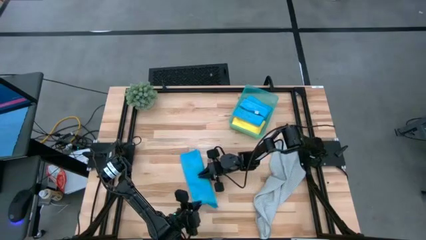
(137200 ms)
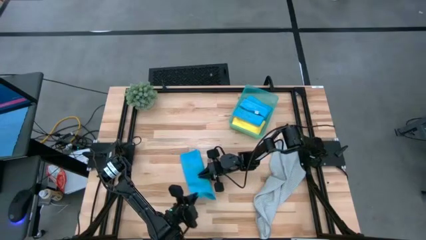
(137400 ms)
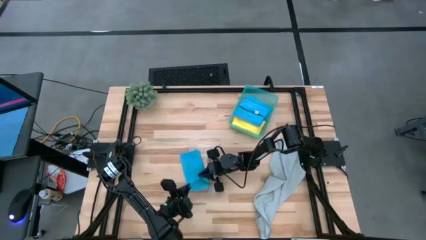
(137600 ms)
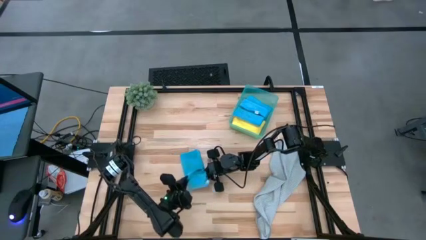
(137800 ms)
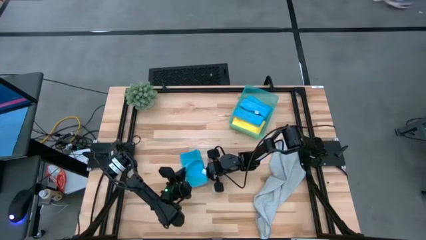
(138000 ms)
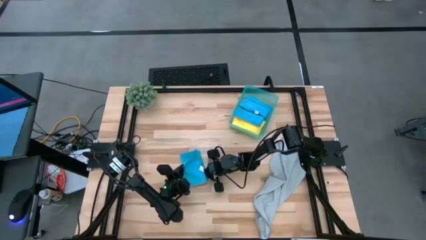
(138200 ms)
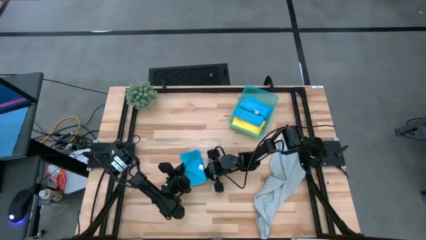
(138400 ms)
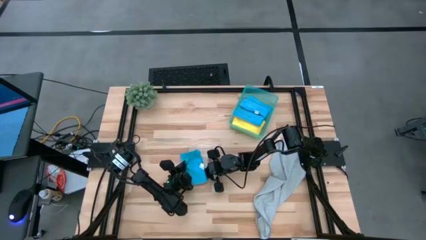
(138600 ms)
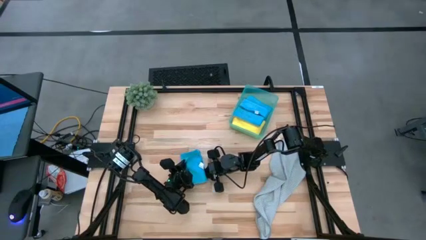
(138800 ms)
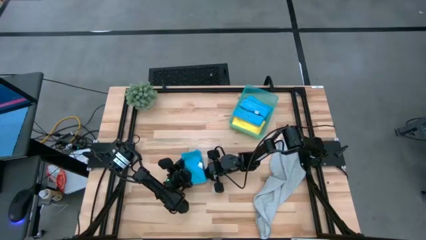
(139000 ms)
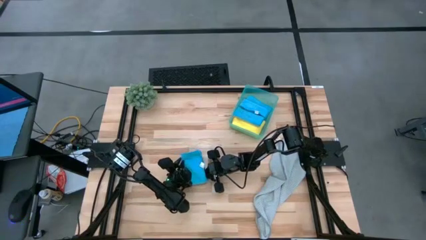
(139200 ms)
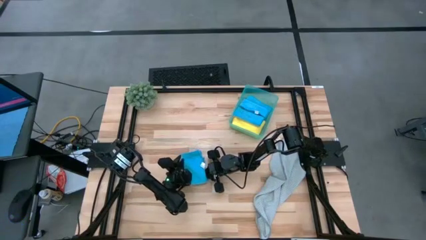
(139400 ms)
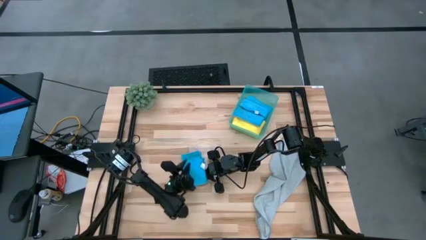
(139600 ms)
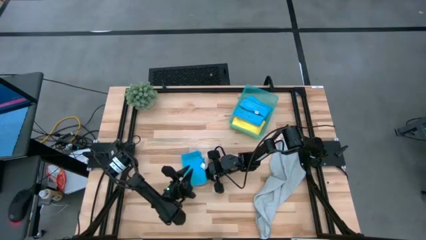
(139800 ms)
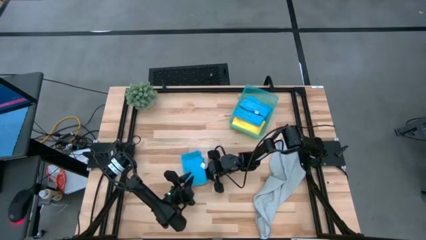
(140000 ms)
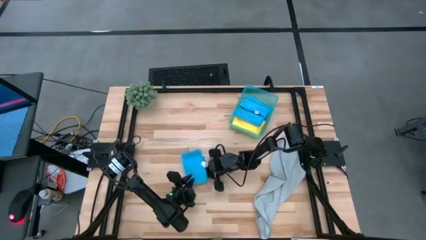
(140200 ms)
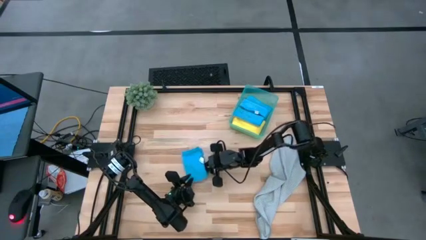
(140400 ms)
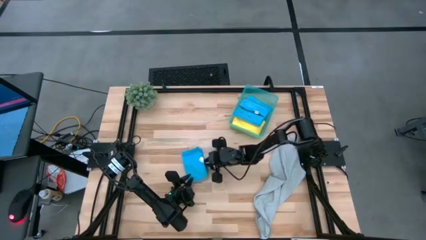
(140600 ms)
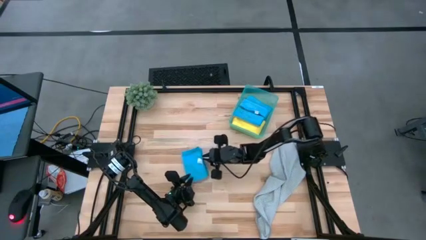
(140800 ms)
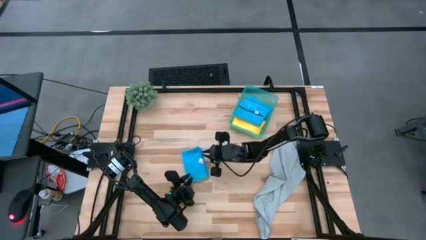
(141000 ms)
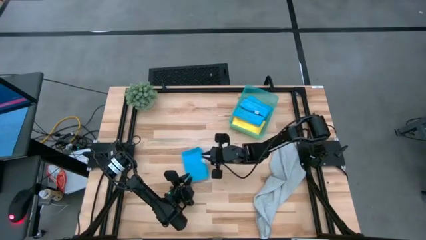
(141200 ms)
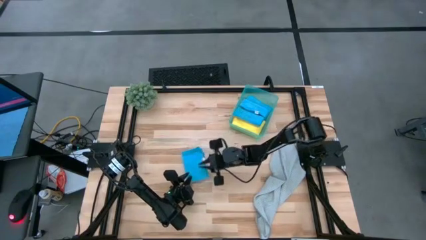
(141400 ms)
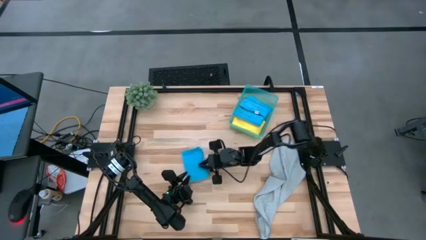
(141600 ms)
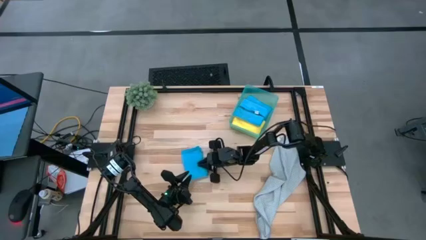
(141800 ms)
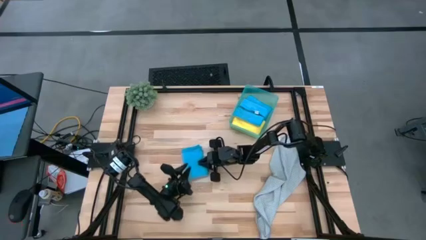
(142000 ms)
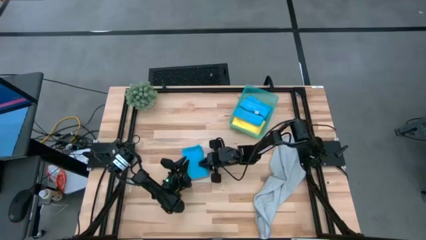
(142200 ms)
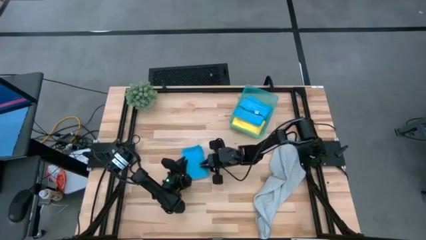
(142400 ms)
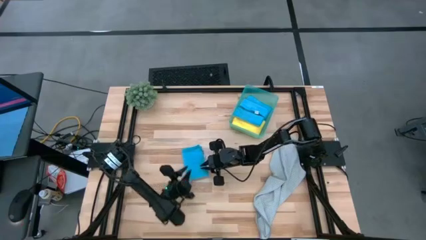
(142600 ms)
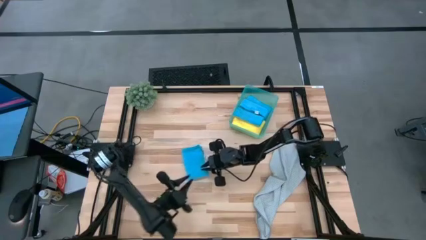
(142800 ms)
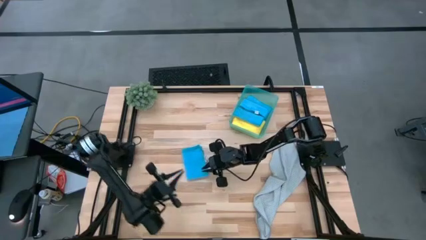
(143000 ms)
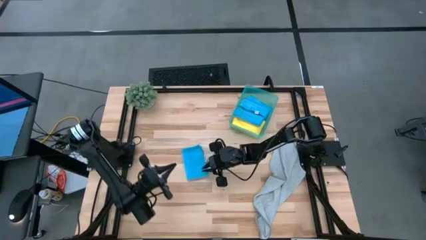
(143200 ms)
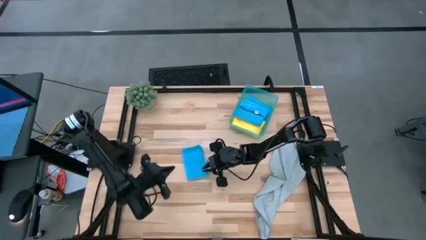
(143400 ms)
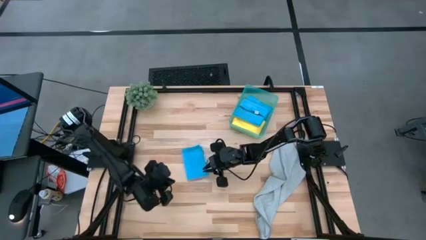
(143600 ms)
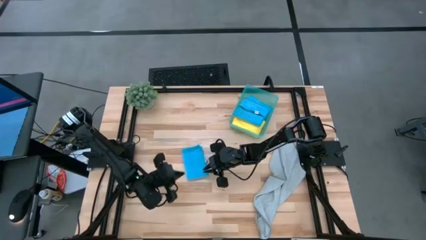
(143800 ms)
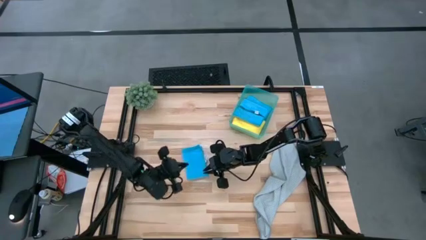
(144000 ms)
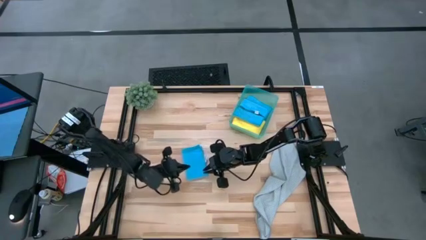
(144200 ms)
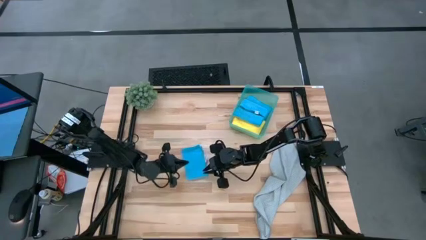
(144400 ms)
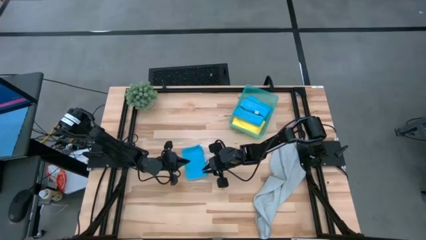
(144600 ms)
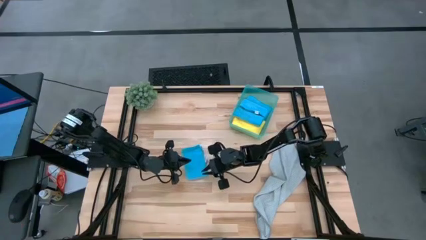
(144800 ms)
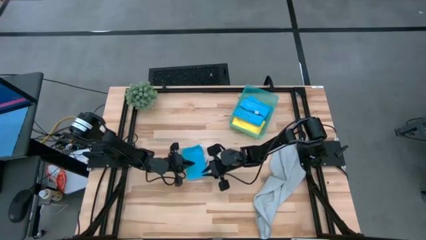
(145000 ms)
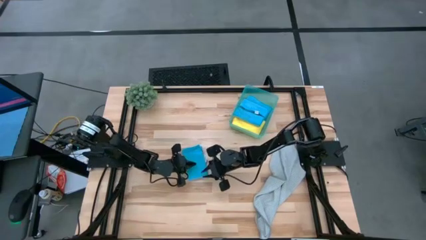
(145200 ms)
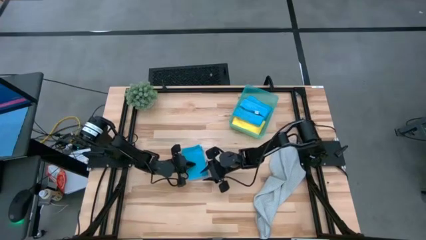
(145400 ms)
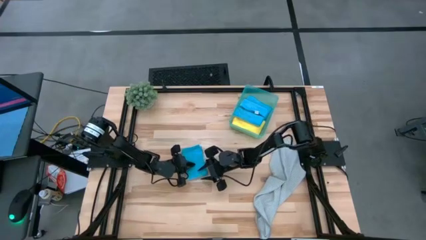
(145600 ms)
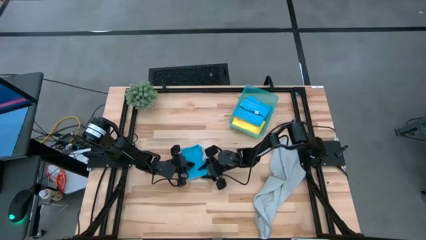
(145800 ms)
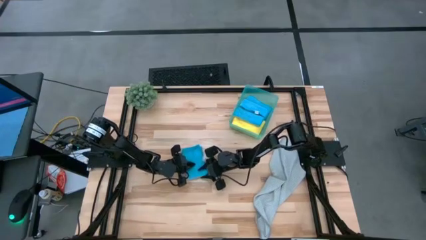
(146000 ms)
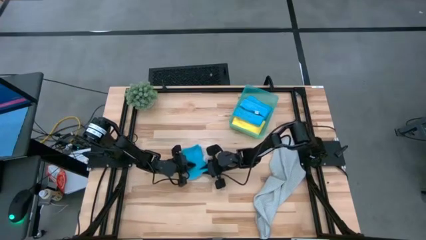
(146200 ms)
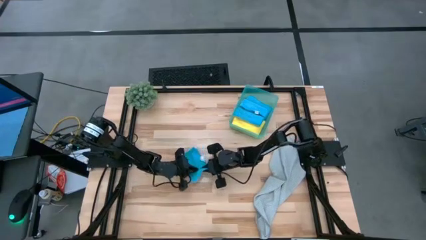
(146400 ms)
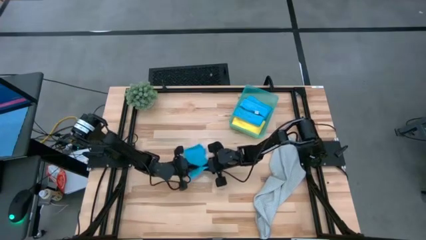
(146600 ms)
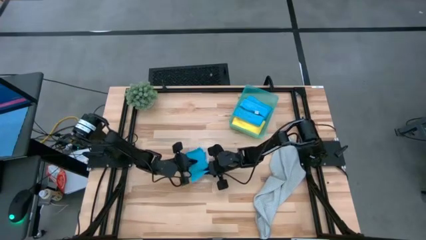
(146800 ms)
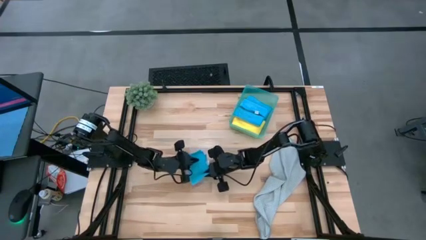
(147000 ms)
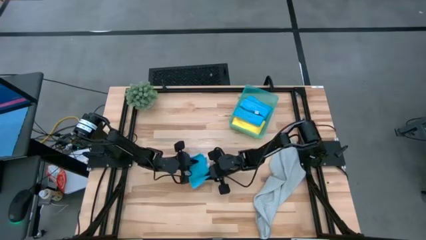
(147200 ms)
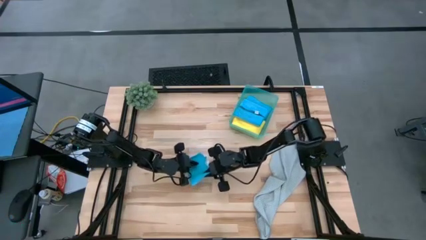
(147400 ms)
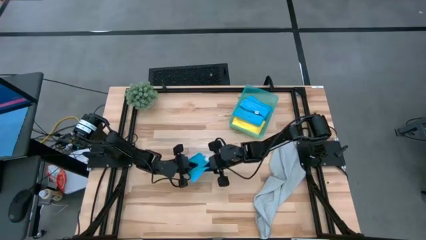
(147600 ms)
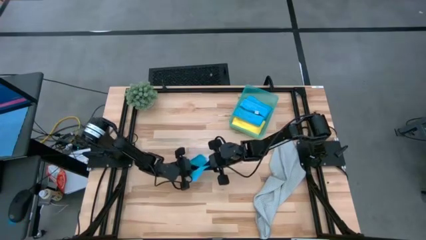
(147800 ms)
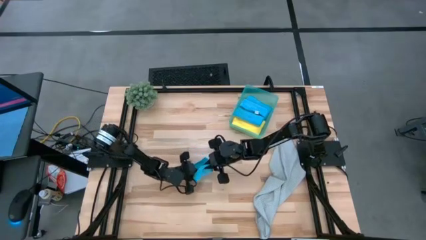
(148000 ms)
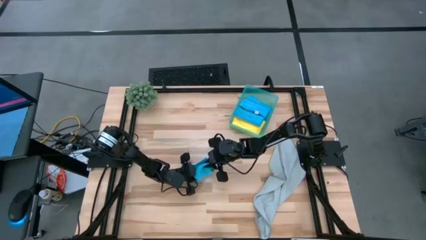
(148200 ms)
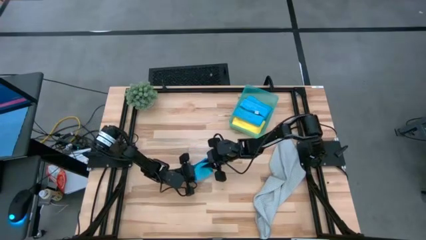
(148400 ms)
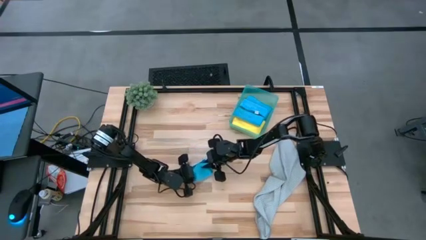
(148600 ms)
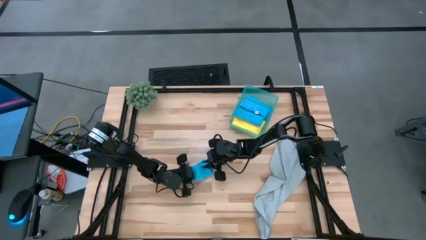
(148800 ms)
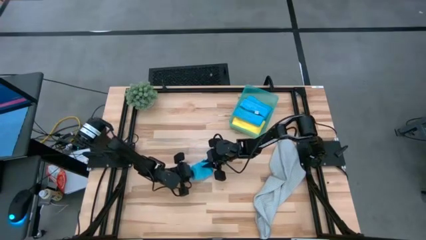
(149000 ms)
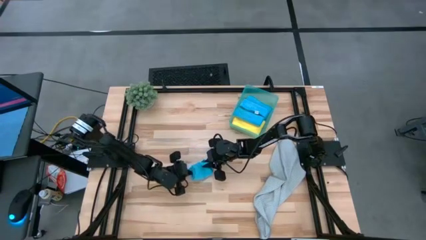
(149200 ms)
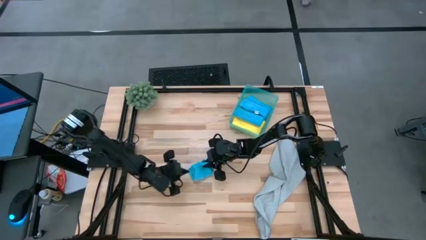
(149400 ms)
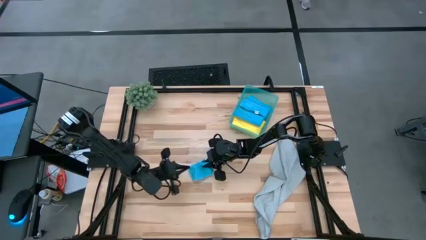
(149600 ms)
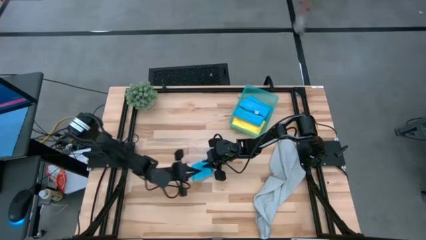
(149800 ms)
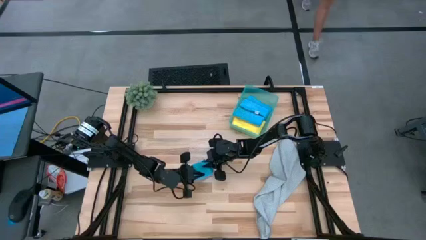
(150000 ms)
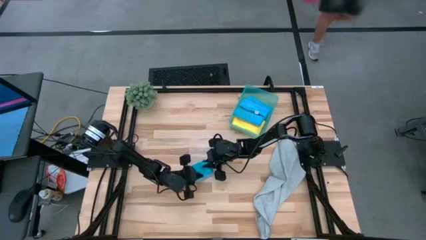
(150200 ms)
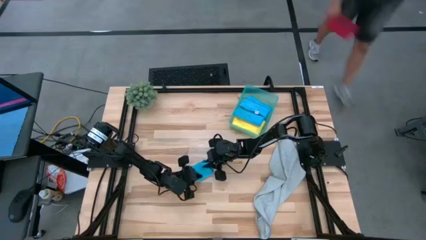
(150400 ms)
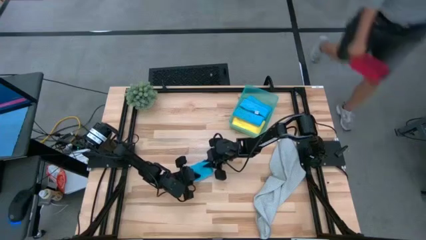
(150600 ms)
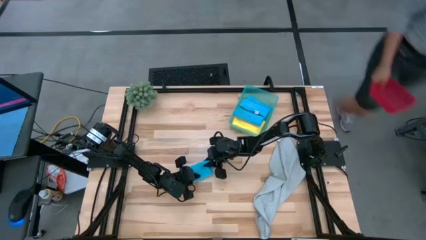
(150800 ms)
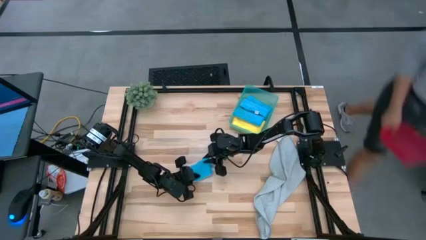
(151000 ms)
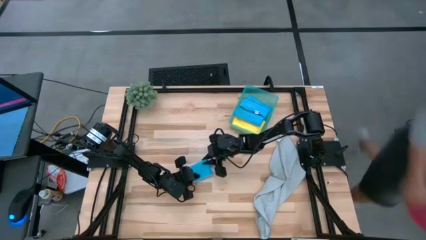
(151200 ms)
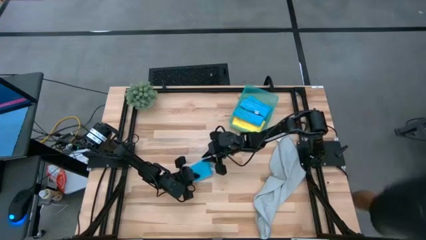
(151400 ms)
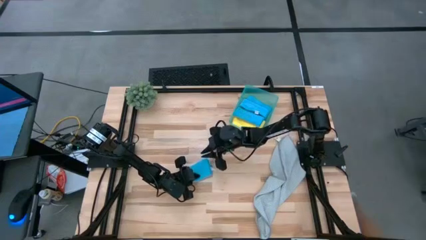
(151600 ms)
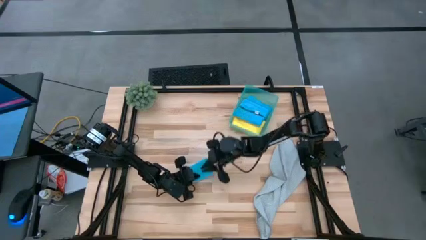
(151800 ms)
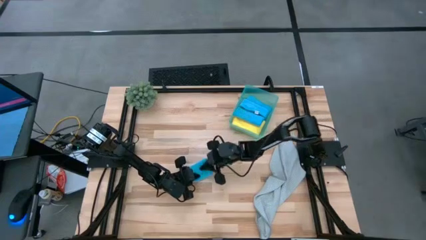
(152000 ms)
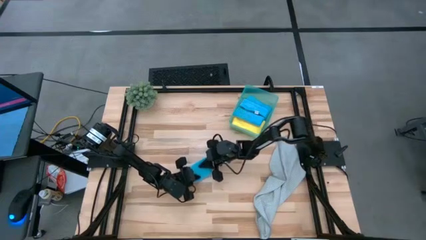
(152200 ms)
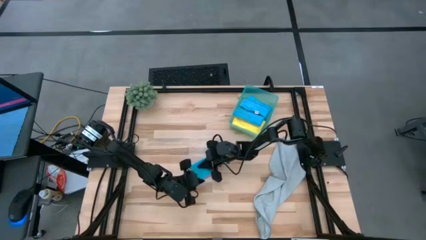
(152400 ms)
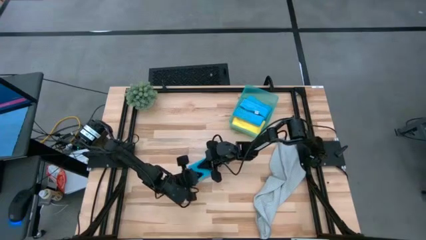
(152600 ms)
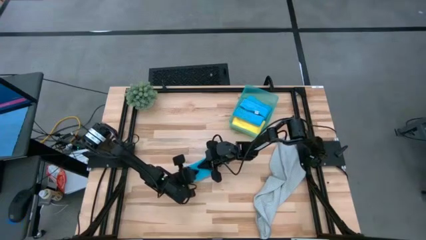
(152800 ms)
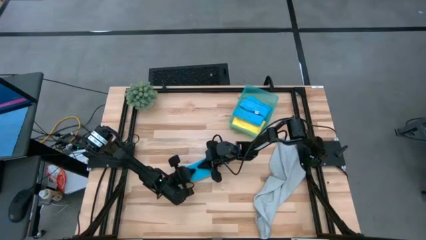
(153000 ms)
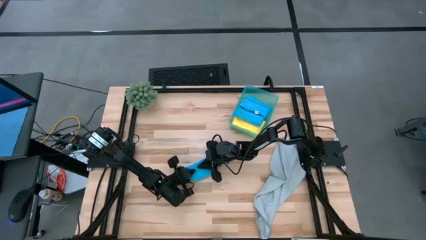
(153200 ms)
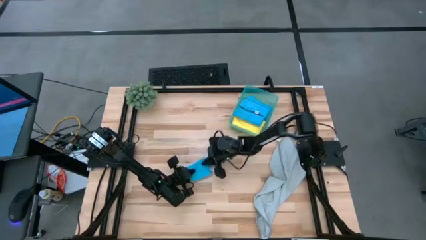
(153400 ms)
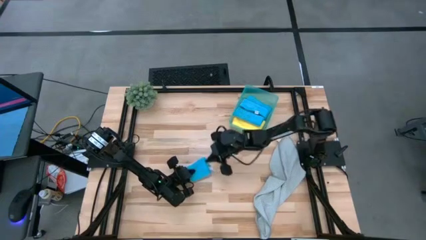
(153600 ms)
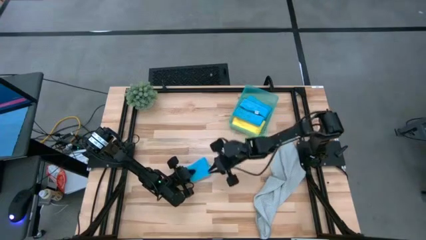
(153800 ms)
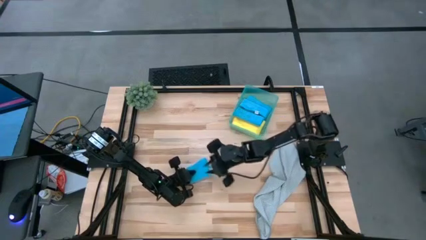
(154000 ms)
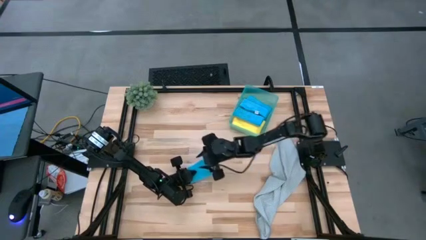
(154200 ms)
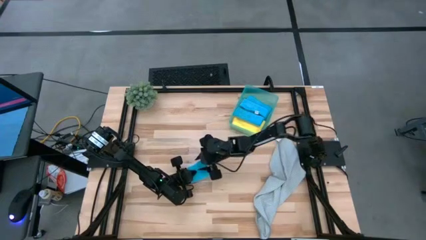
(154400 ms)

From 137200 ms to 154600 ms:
Task: Fold microfiber towels
Fold the blue towel
